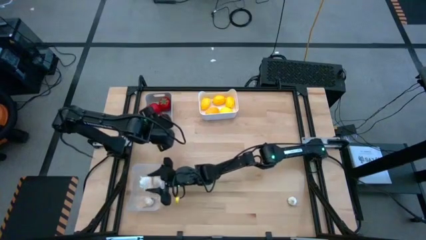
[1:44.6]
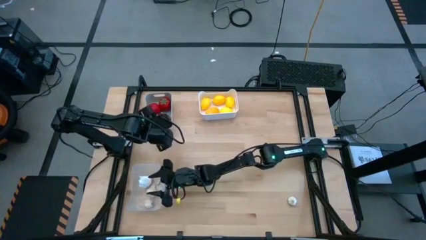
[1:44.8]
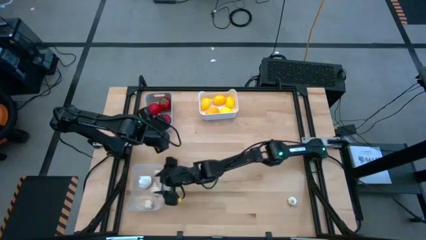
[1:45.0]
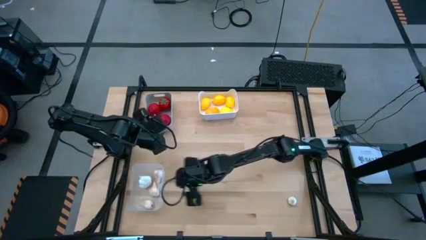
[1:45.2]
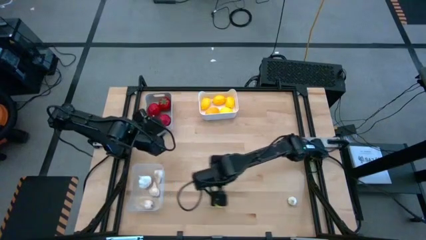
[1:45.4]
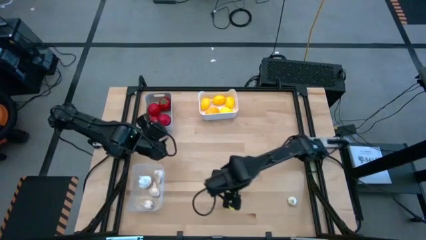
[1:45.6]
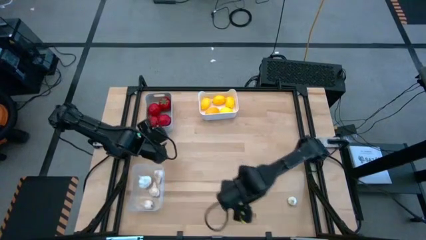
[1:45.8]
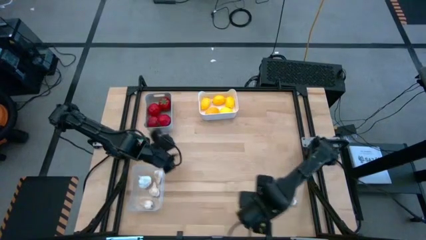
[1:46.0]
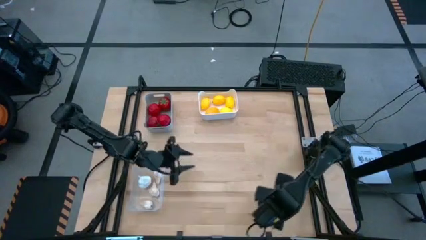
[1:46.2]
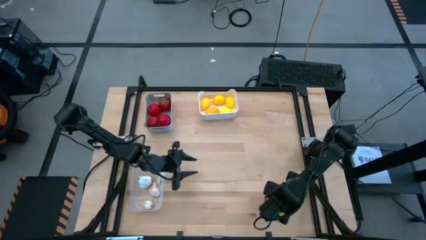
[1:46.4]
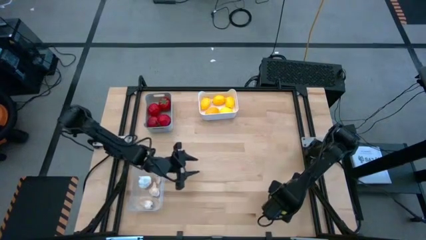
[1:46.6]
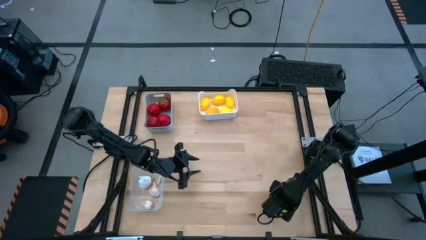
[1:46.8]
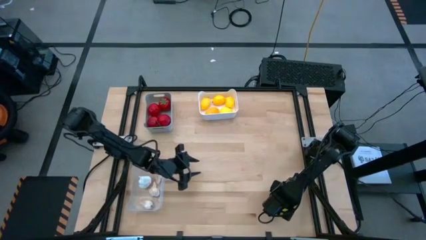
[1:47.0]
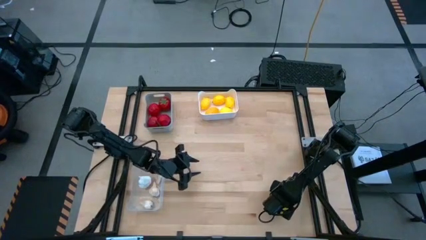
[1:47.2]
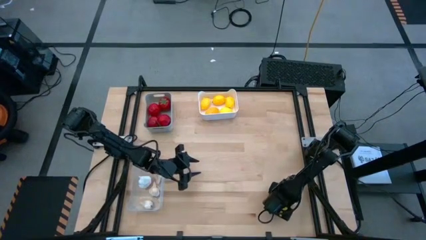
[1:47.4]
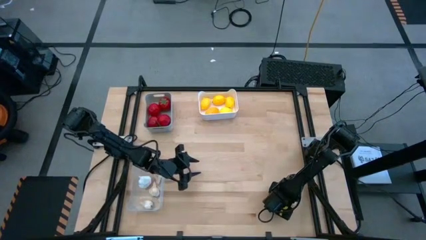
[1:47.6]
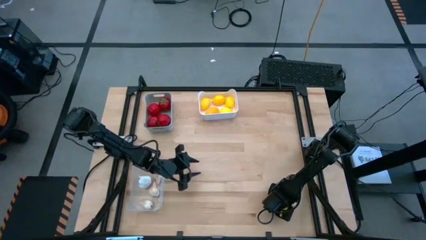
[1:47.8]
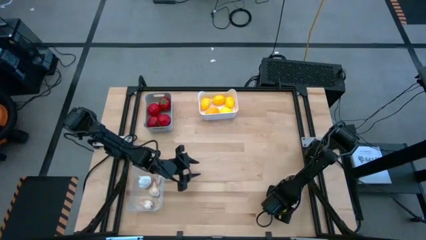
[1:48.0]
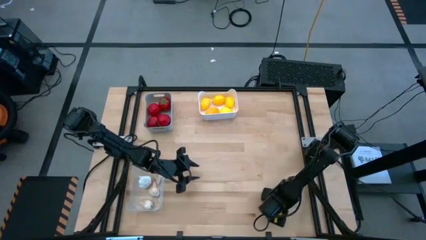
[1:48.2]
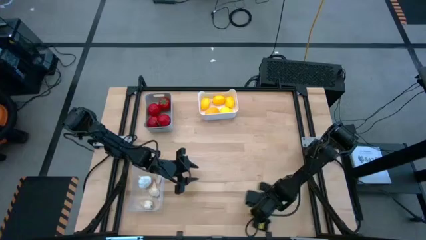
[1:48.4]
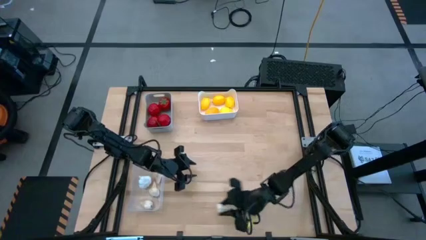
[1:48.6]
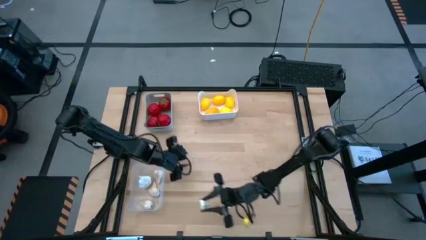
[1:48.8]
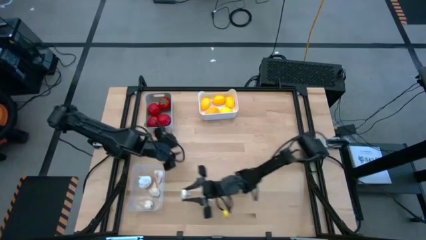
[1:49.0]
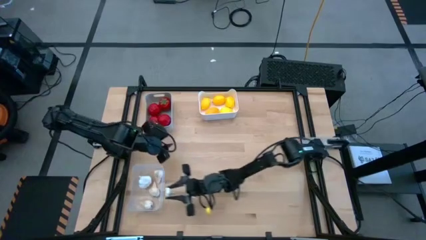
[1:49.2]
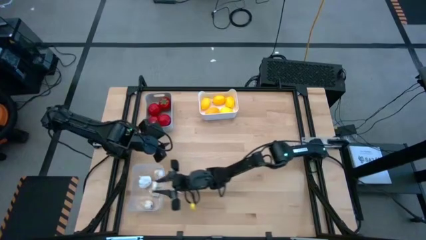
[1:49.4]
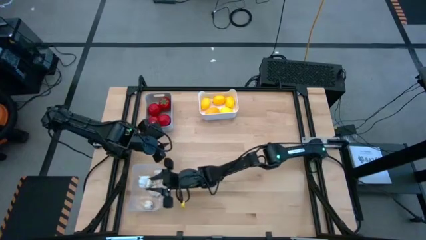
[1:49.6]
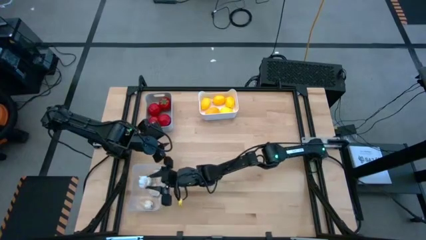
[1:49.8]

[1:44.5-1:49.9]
Task: Sort produce into baskets
Put the garlic into the transparent bin

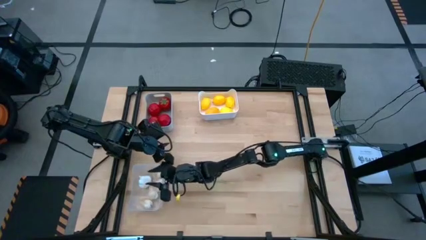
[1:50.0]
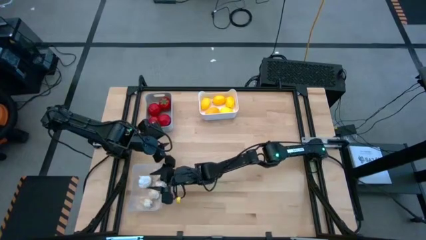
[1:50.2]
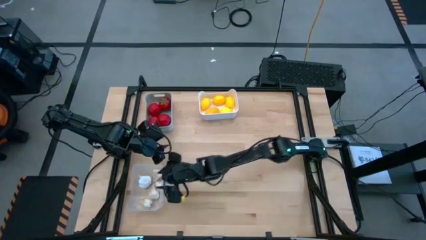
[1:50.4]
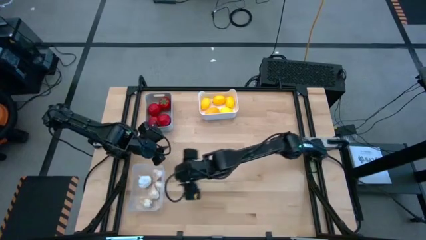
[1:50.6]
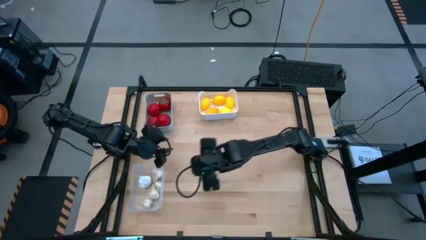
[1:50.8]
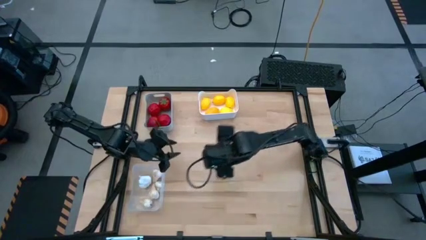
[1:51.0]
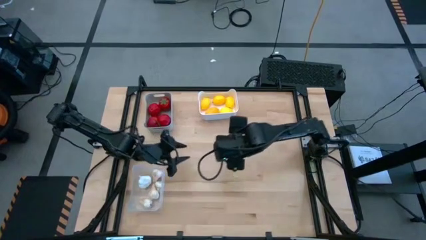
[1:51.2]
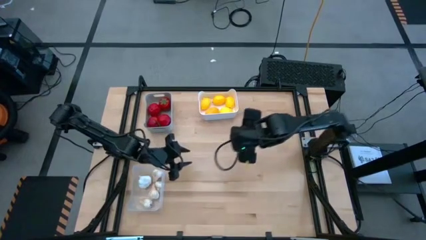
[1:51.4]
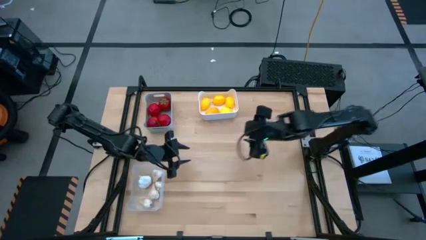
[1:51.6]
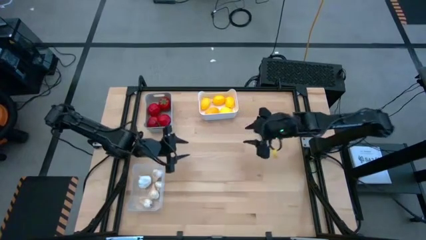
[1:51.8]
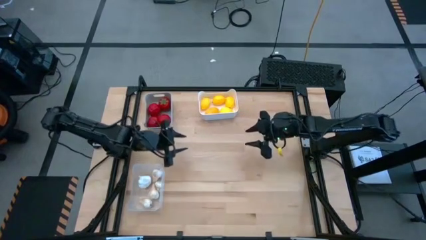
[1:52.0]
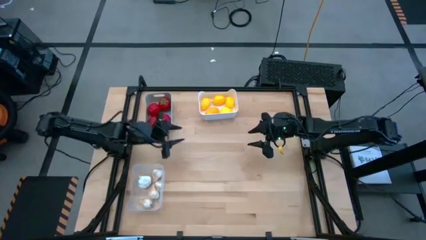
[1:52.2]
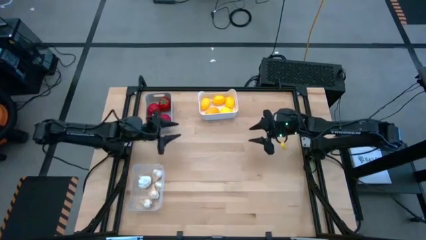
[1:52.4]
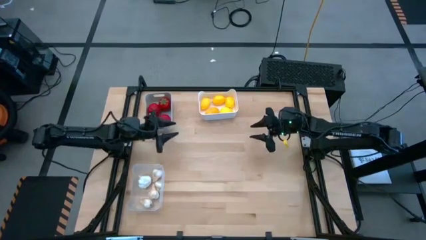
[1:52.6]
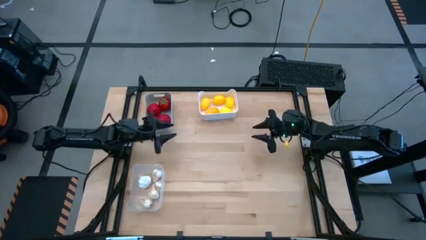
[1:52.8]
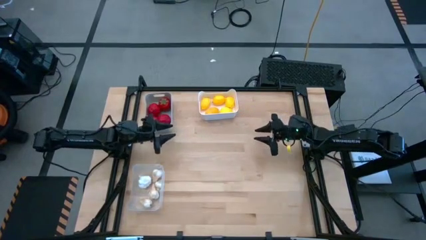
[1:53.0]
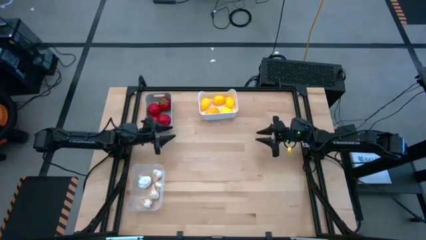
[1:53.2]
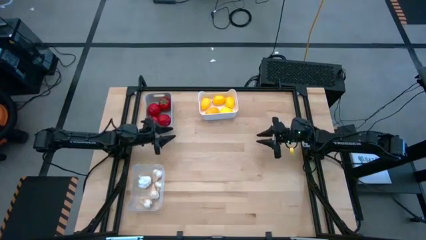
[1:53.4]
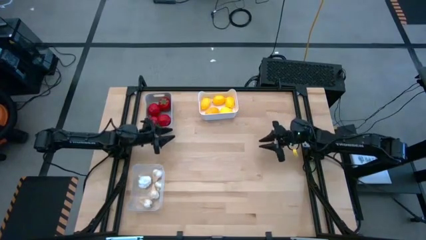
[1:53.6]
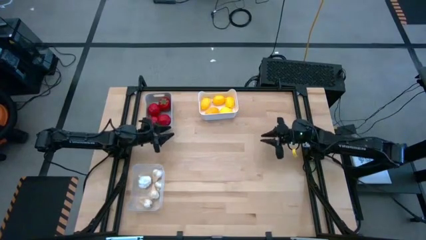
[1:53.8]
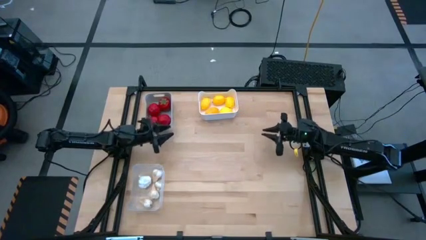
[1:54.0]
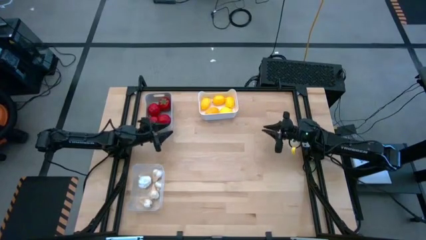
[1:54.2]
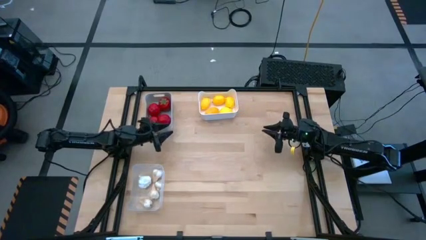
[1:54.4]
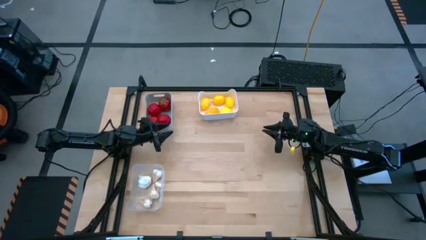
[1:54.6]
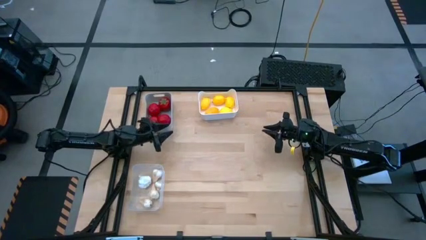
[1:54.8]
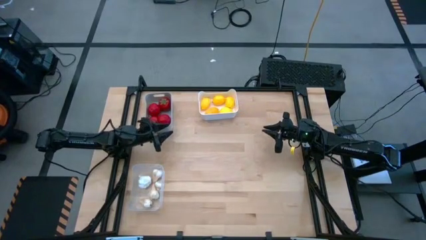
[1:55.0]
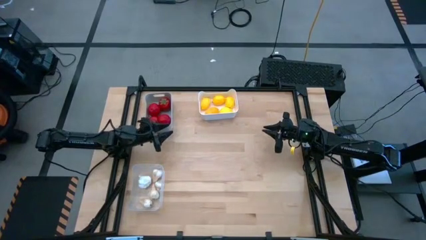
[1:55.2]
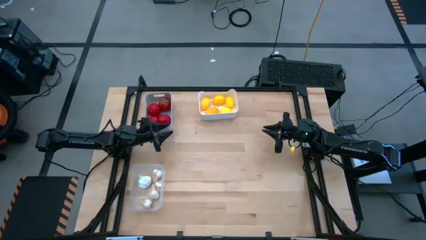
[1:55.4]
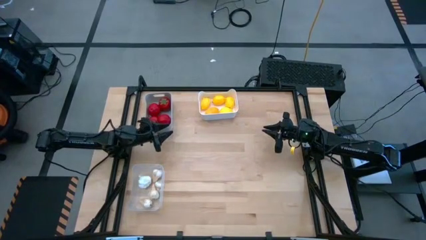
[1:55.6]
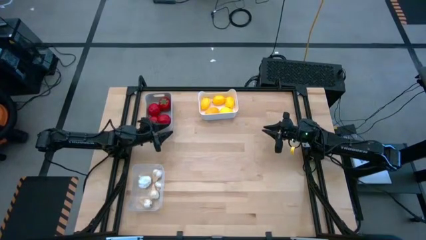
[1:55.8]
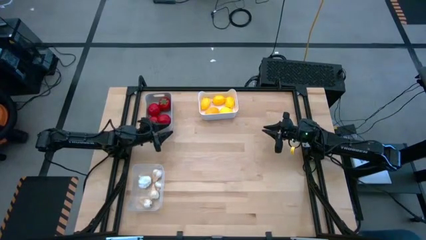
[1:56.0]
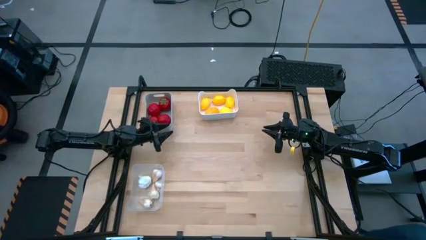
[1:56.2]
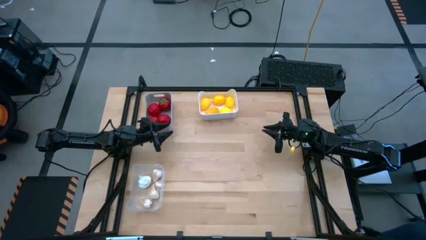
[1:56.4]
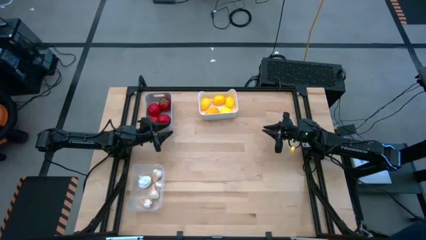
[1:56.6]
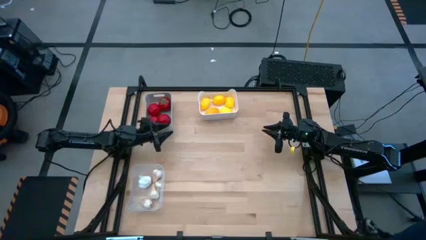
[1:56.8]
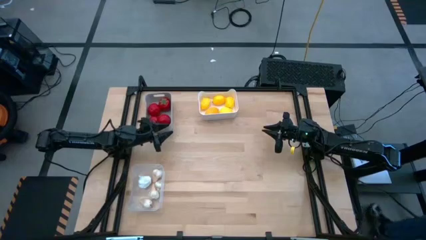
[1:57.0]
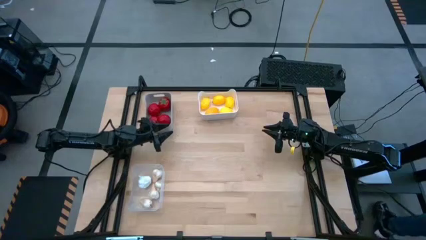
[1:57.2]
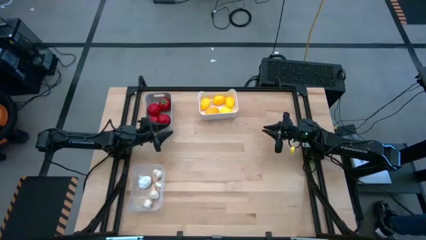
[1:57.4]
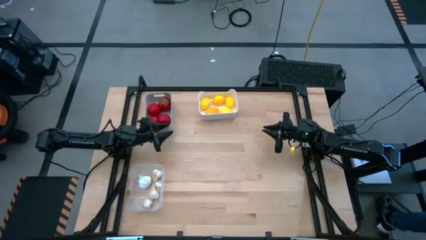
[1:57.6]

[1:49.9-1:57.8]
Return to Home Position
